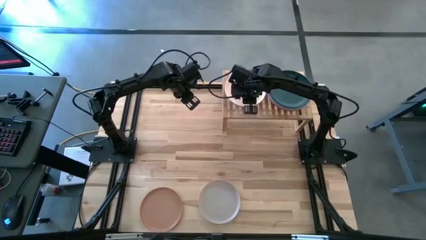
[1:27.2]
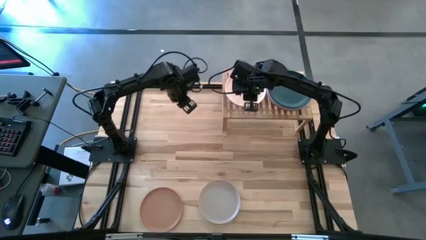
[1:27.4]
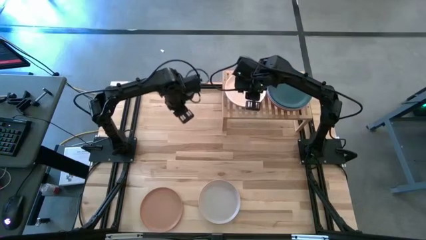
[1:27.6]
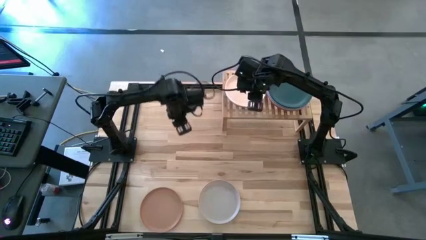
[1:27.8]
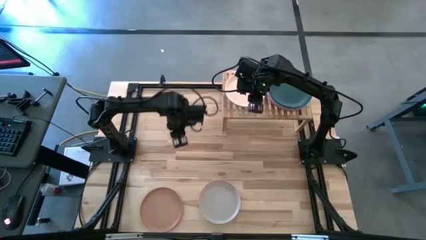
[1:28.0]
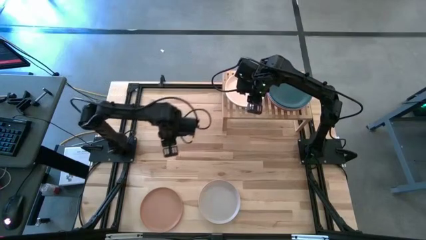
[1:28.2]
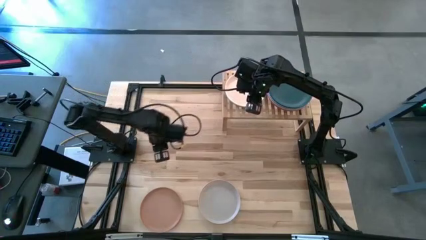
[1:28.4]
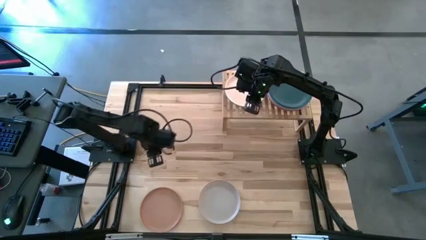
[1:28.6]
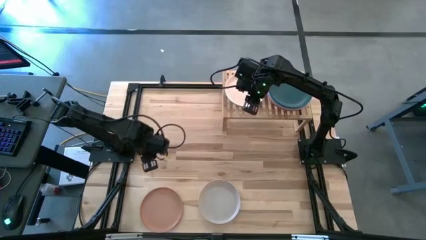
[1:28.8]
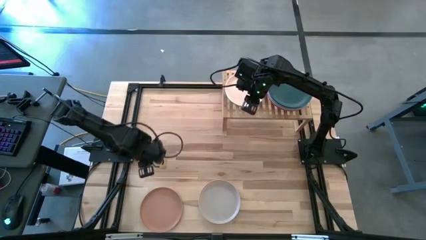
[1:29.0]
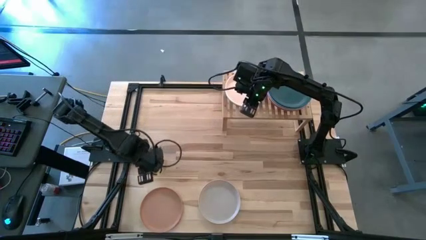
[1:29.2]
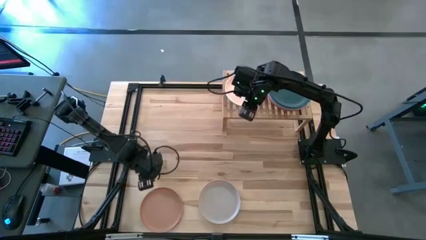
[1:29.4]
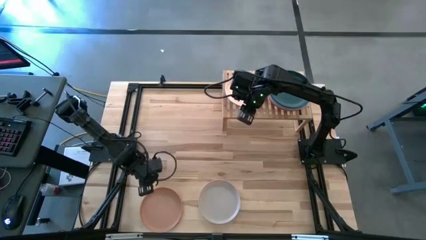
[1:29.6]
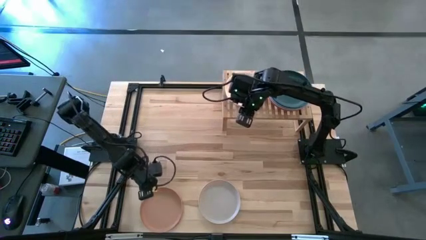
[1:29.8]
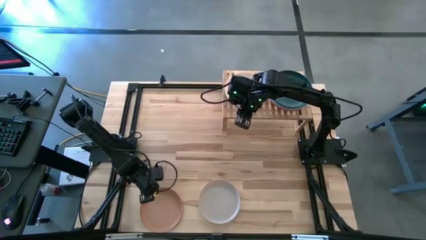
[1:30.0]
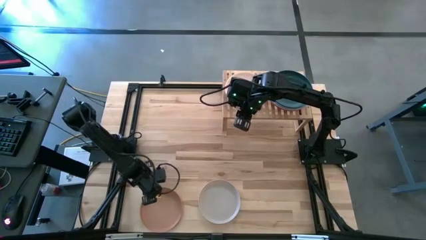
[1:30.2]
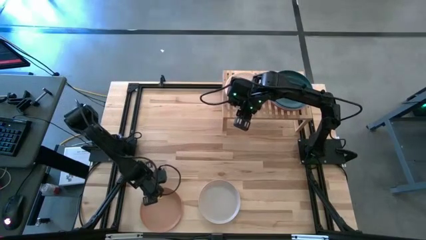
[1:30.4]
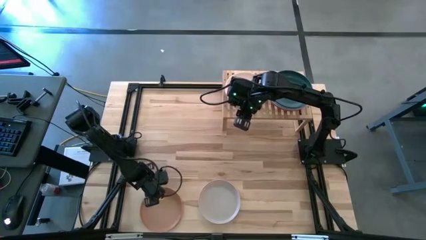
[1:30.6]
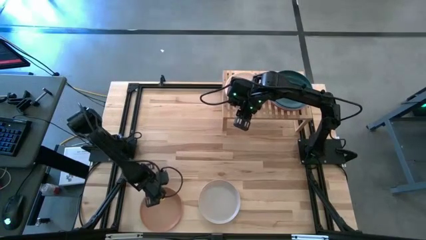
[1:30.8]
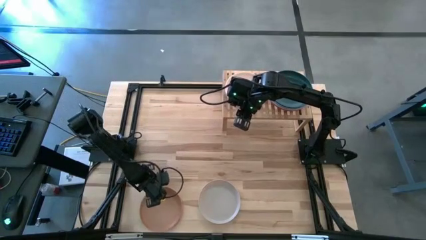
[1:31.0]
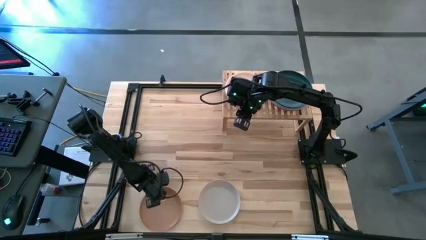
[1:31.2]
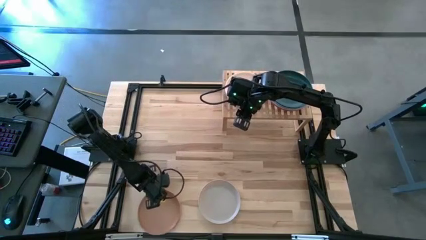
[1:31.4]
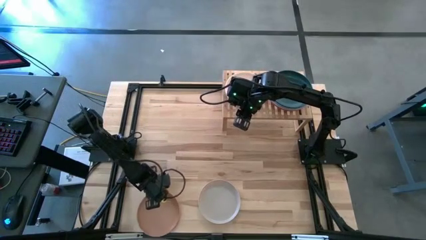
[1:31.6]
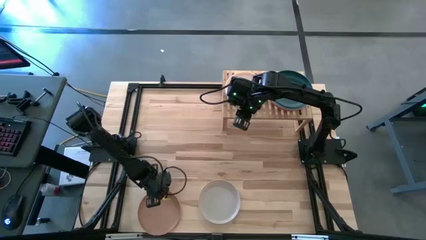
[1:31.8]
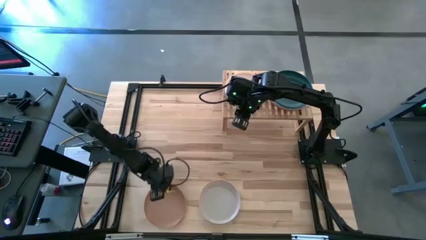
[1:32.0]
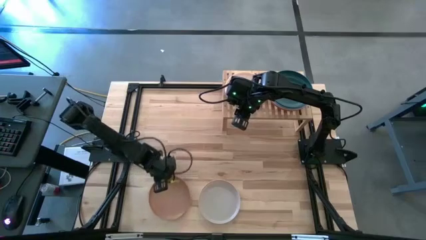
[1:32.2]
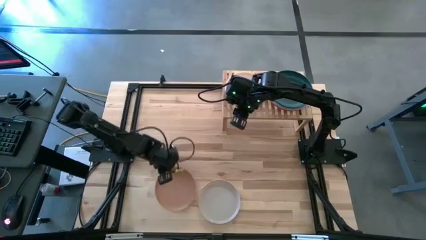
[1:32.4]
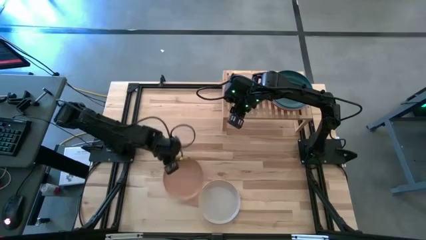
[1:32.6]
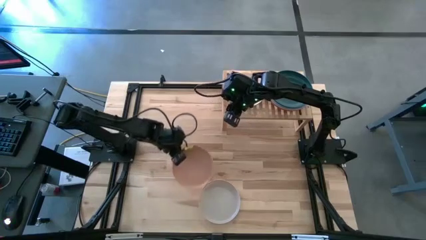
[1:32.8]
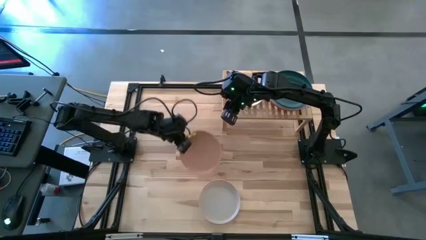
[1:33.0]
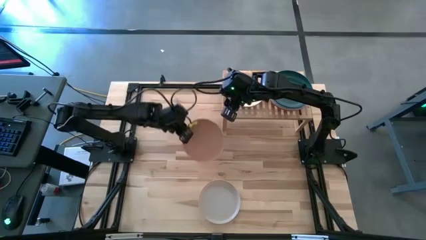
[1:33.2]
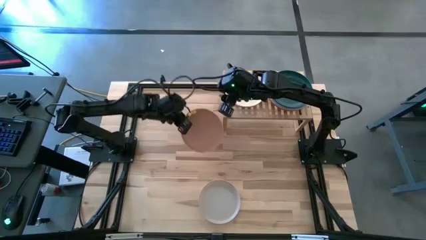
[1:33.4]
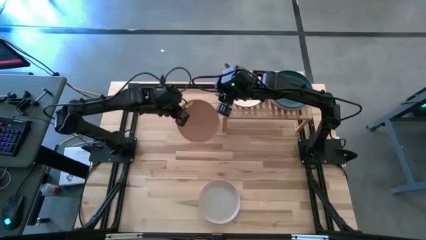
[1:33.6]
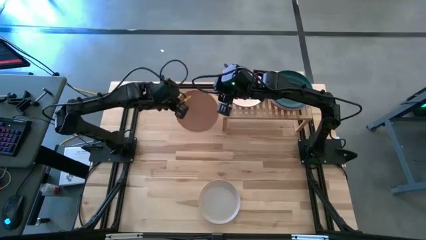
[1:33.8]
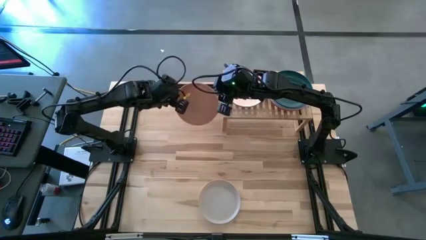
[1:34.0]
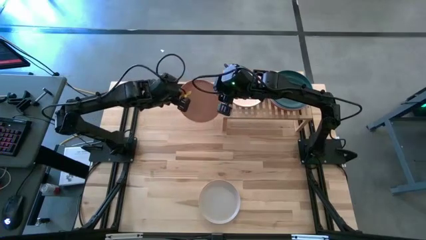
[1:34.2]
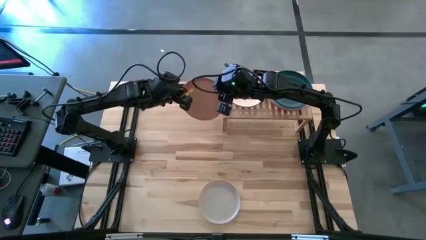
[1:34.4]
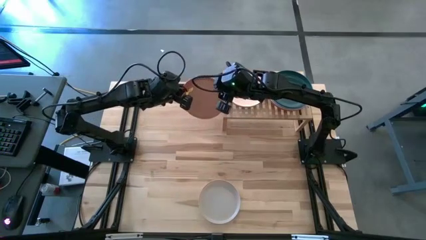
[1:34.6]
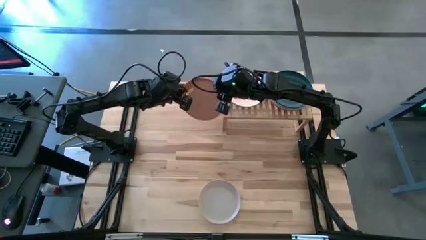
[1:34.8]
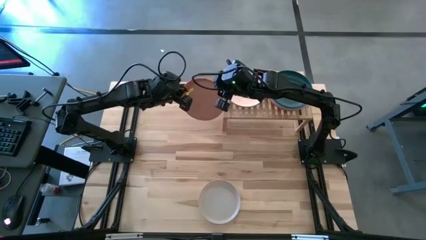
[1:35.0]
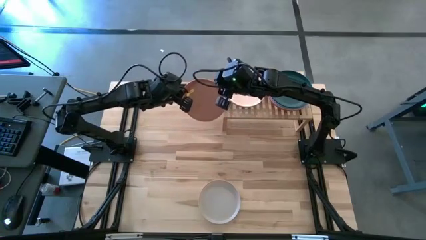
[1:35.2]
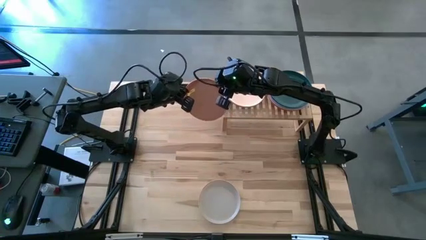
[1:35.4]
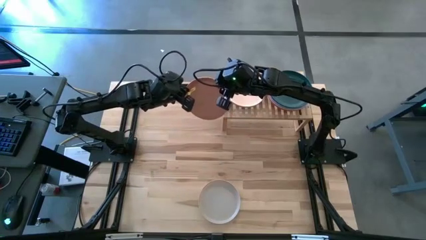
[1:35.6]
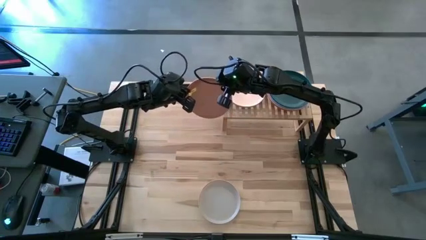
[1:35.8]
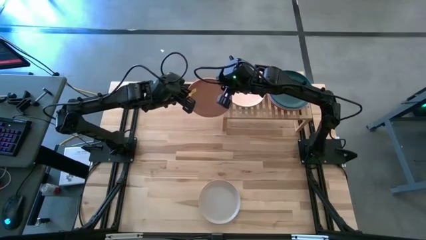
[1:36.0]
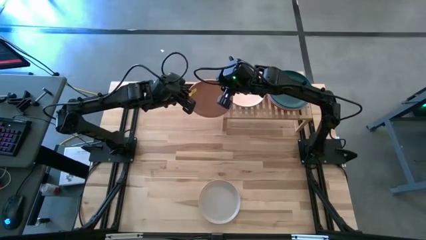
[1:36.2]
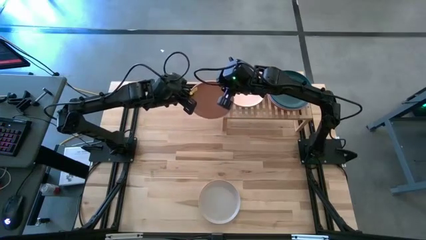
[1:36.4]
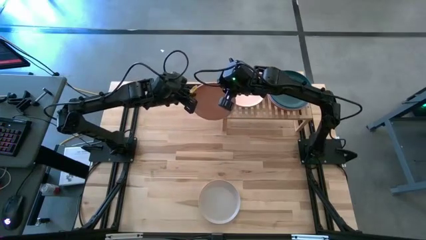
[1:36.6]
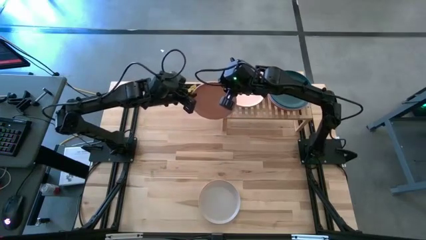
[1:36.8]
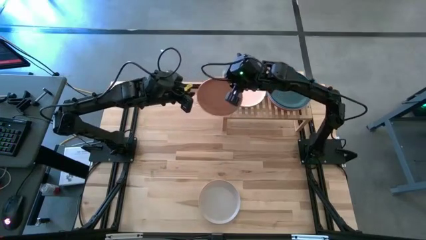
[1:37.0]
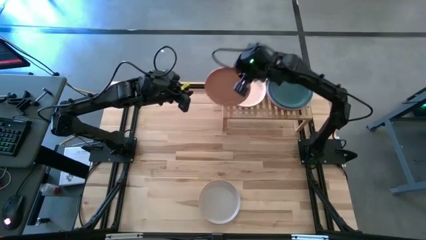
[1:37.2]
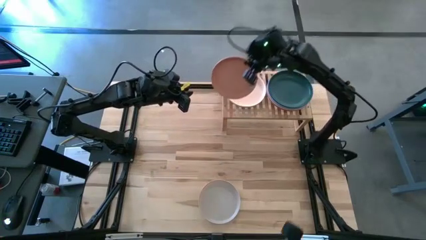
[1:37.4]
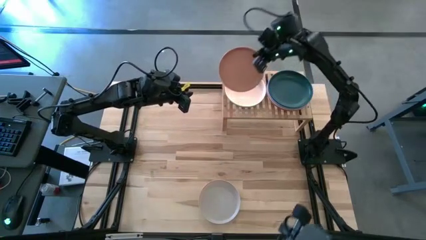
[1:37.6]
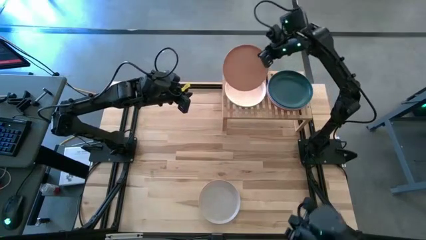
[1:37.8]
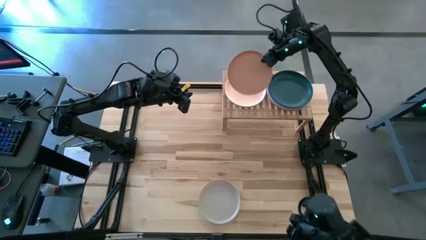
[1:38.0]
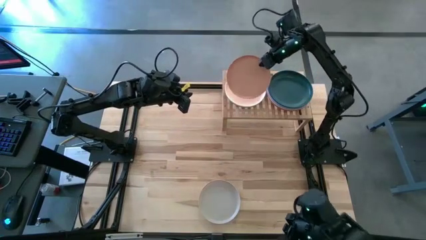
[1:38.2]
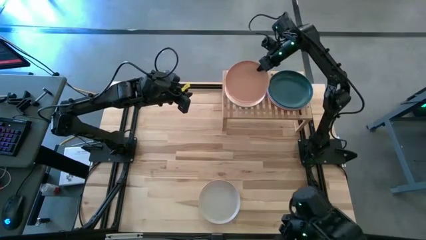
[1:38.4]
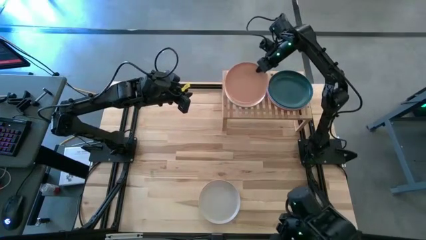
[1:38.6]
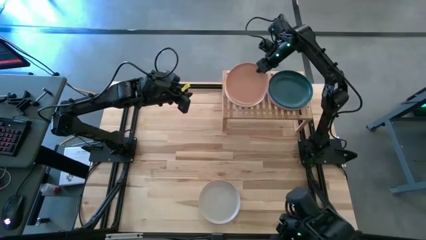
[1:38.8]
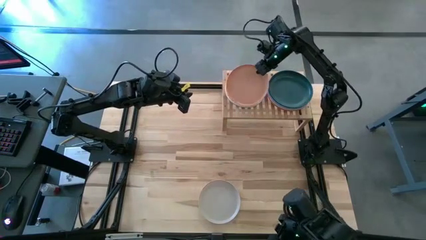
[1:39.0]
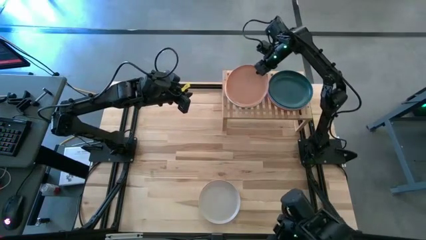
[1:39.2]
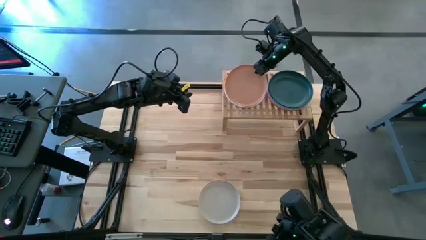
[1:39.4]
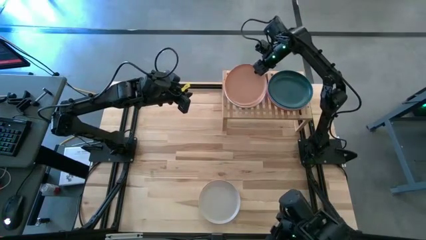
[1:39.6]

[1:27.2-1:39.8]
Task: Place and stack plates onto a shelf
Stack the brown plate on top of the light yellow plate onto the shelf

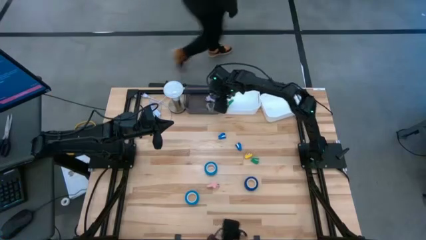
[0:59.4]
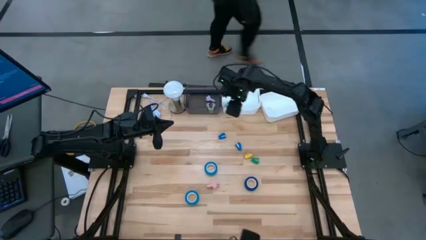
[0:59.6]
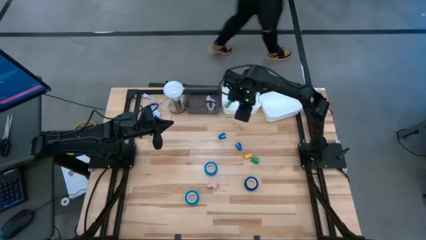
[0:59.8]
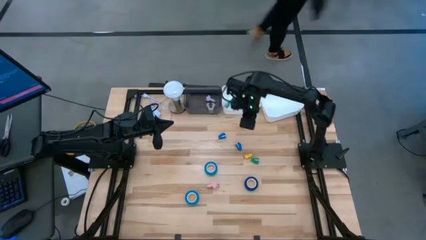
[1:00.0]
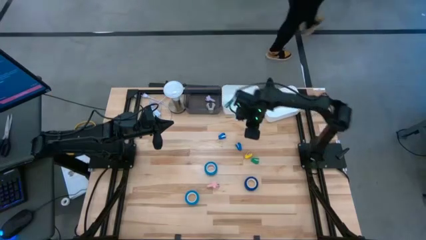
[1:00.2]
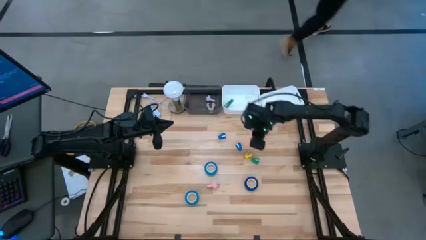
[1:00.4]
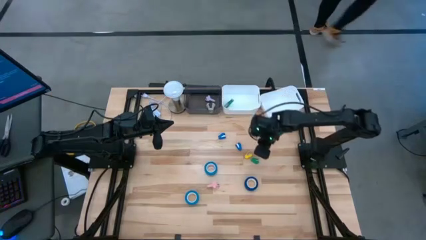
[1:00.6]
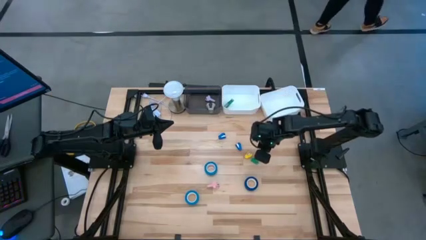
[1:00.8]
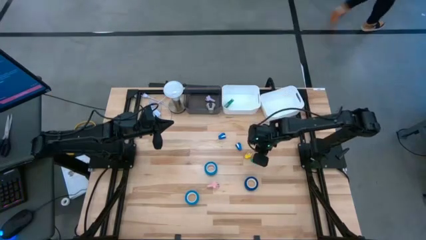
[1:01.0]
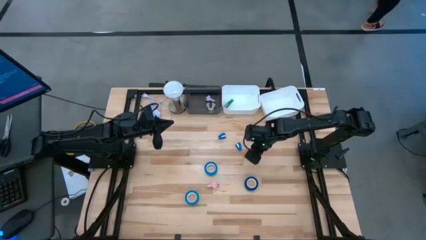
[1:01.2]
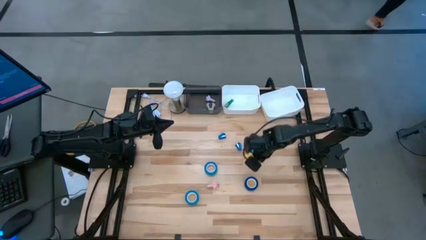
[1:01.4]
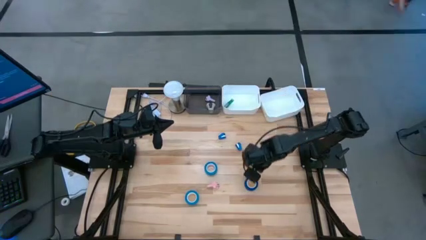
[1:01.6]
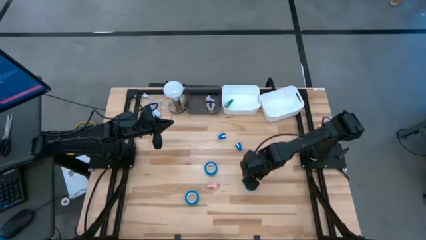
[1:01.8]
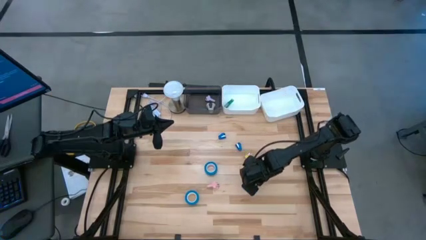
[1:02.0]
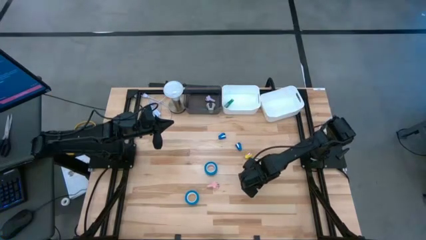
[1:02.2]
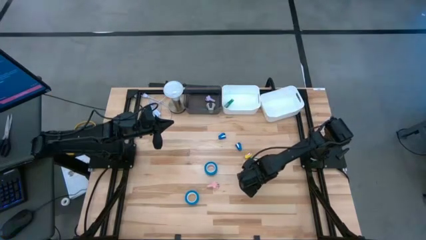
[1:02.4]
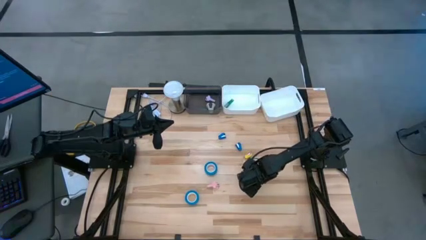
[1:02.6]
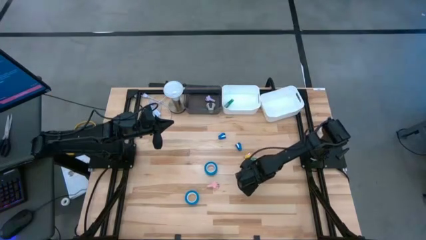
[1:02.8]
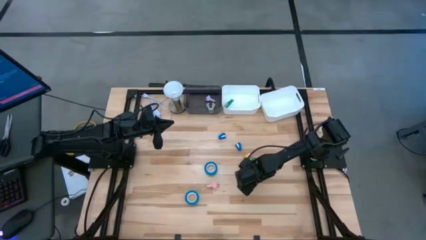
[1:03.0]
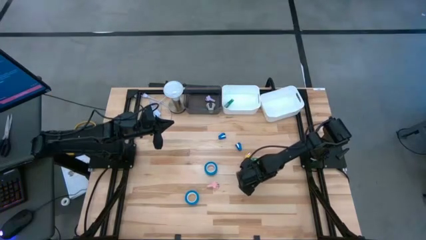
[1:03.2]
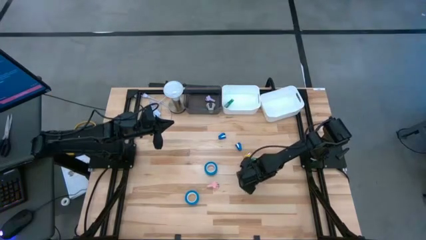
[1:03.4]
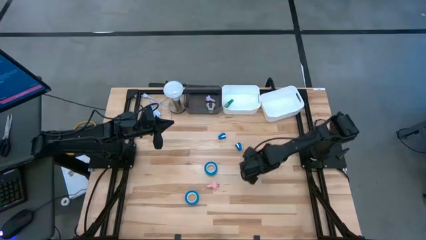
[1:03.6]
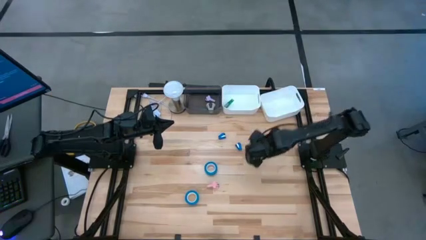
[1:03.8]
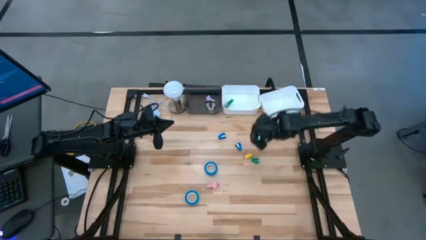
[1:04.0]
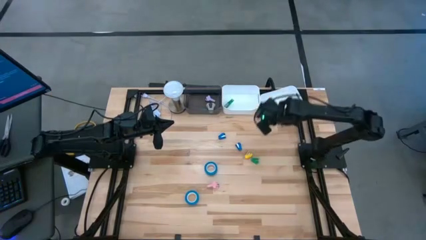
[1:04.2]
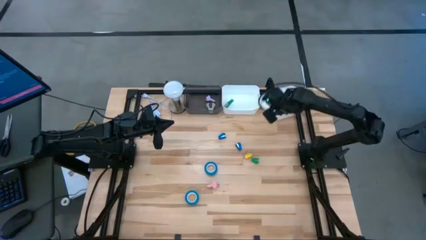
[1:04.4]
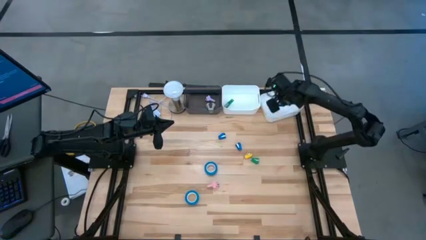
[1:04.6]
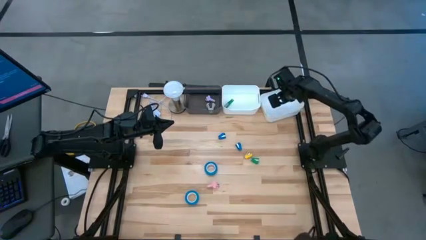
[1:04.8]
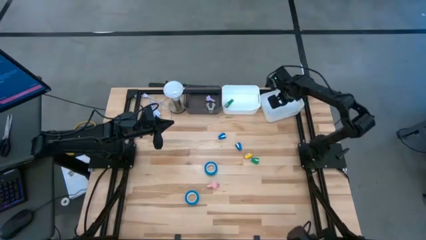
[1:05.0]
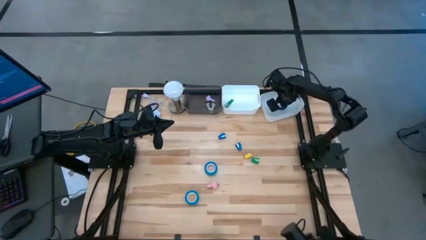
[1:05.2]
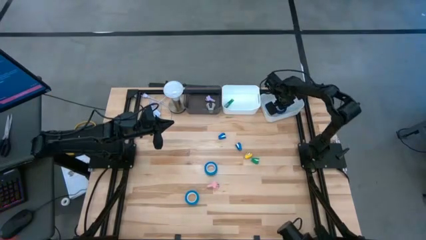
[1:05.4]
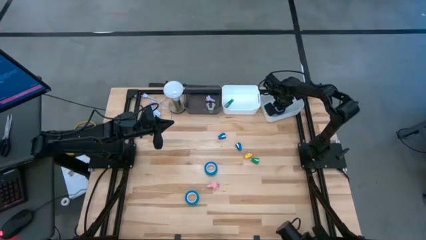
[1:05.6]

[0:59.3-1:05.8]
Task: Pick and place Stapler, Stapler remover, tape
Put the blue tape into the right white bin
